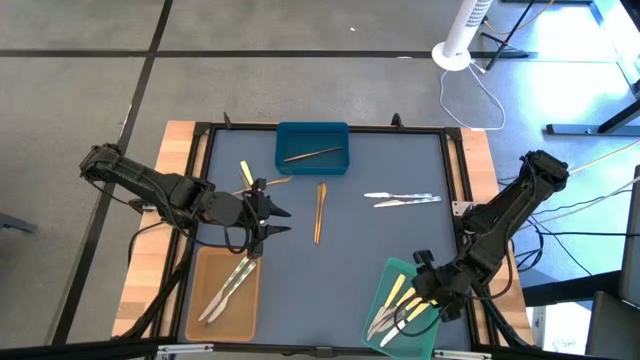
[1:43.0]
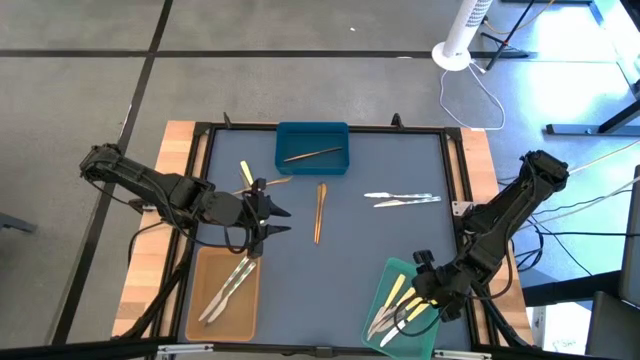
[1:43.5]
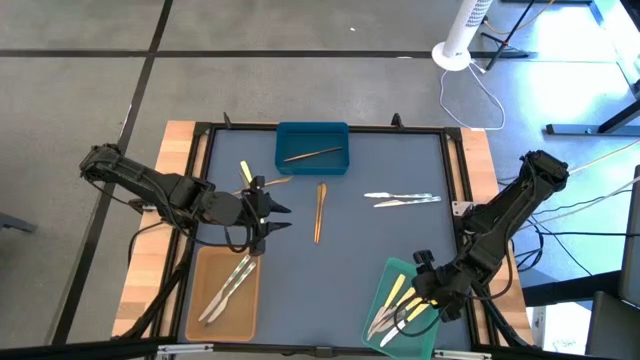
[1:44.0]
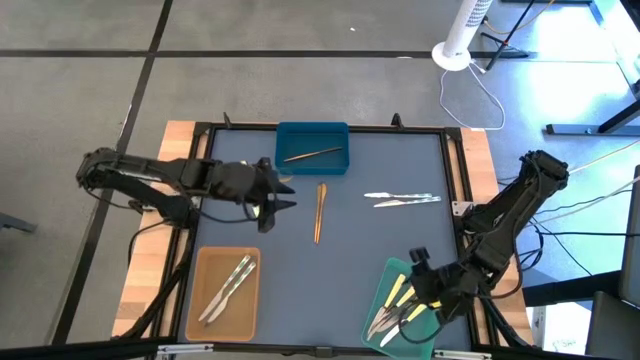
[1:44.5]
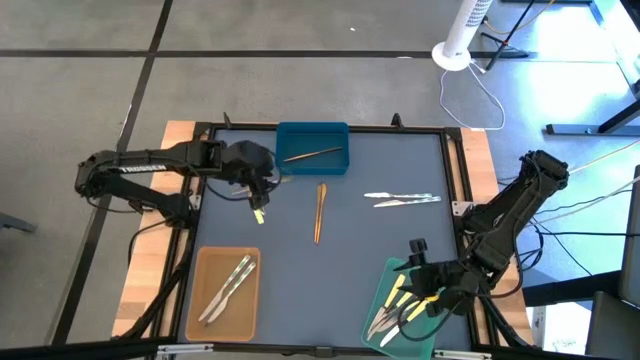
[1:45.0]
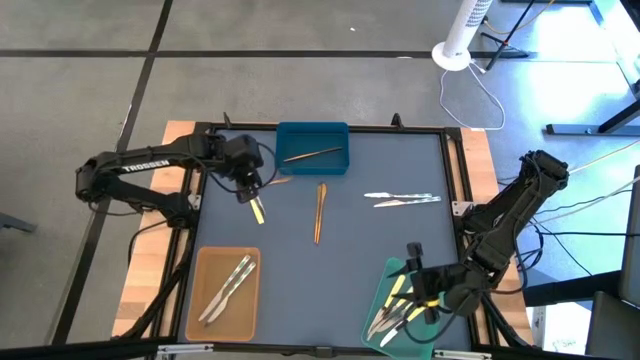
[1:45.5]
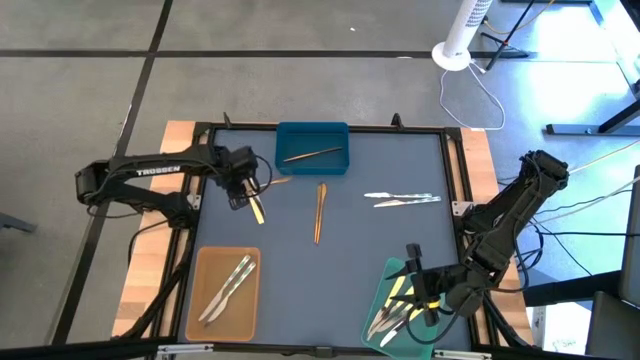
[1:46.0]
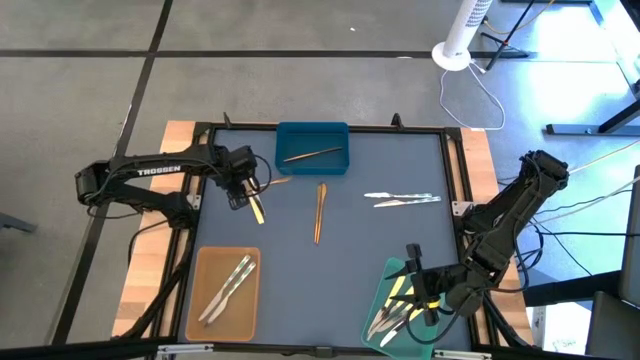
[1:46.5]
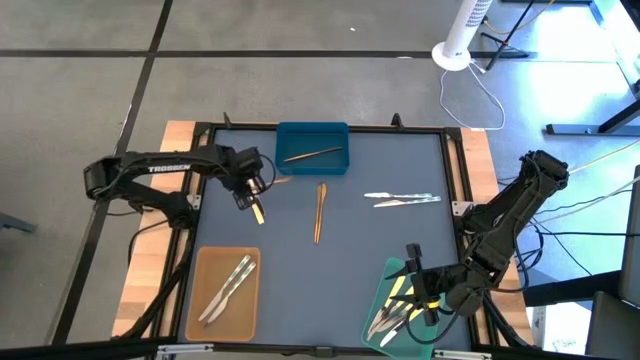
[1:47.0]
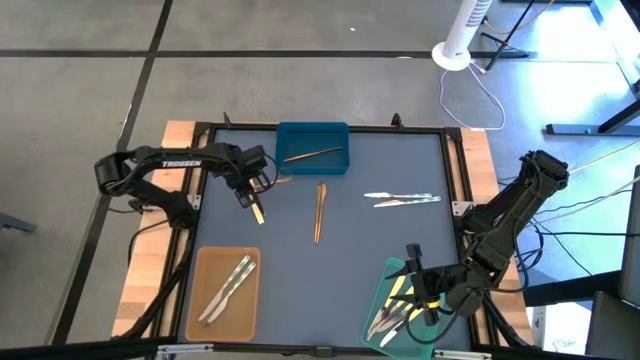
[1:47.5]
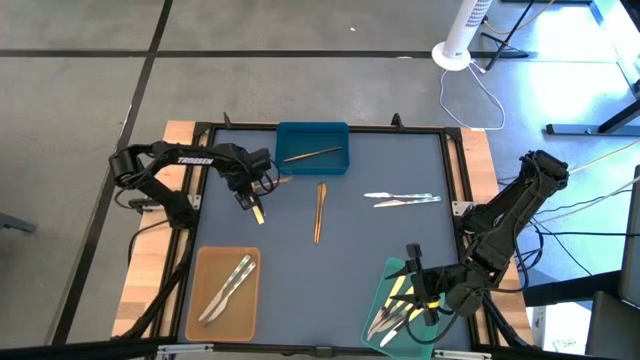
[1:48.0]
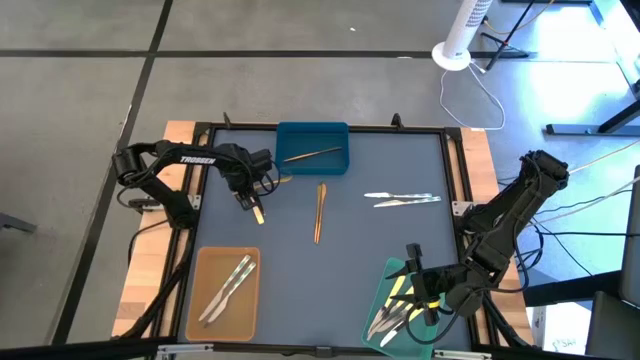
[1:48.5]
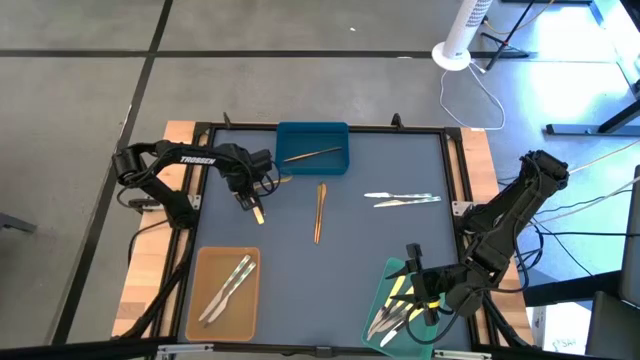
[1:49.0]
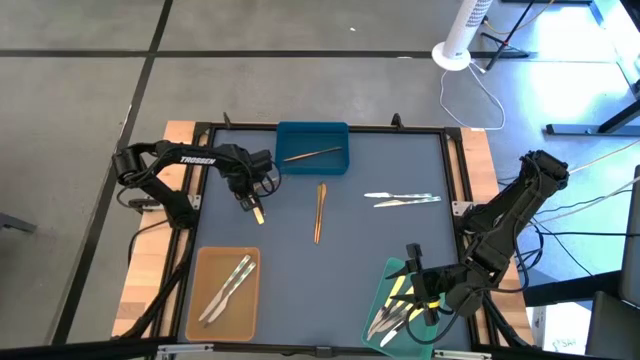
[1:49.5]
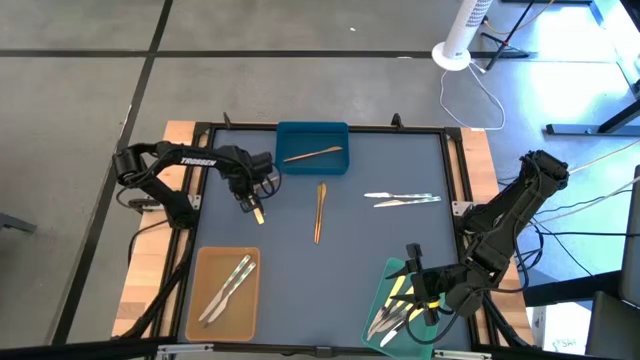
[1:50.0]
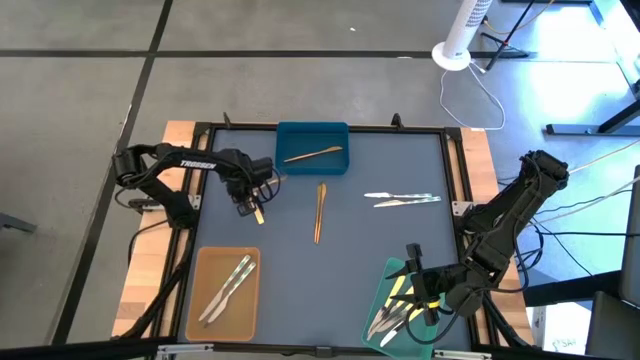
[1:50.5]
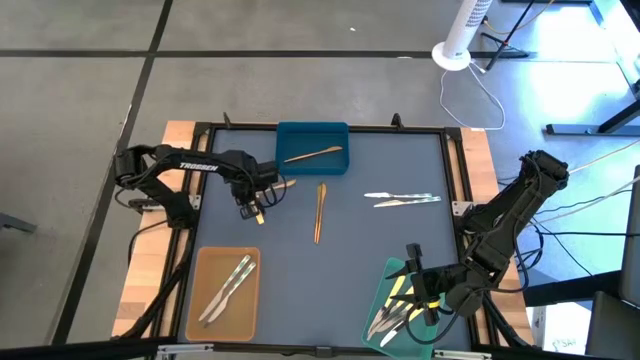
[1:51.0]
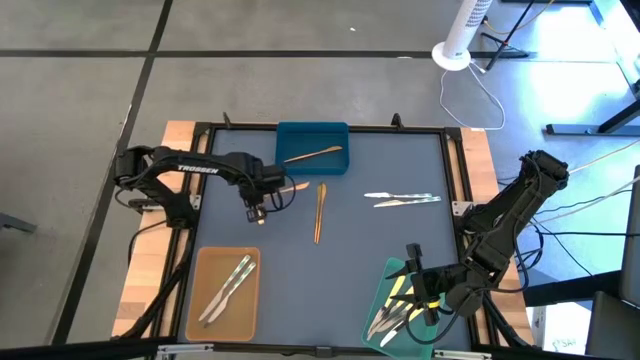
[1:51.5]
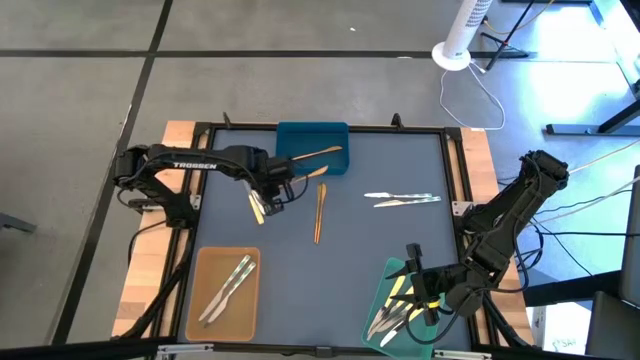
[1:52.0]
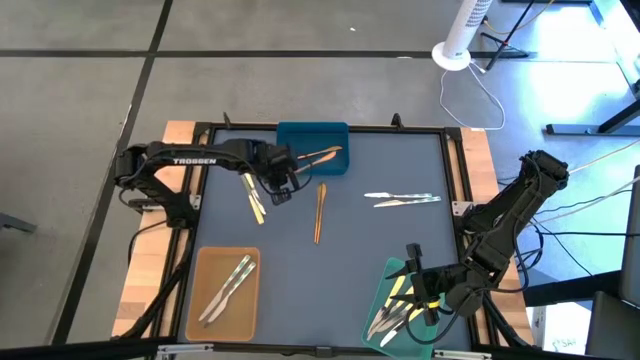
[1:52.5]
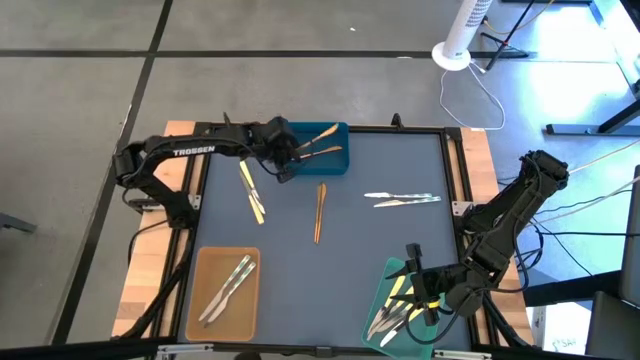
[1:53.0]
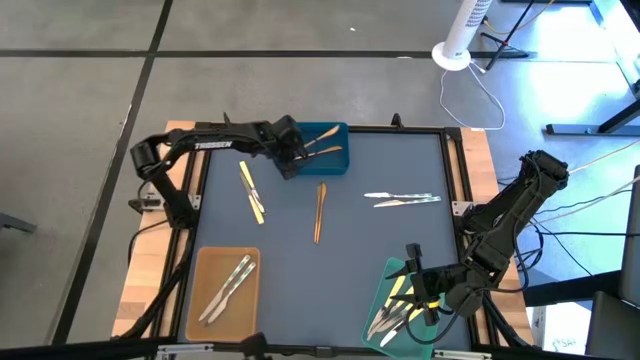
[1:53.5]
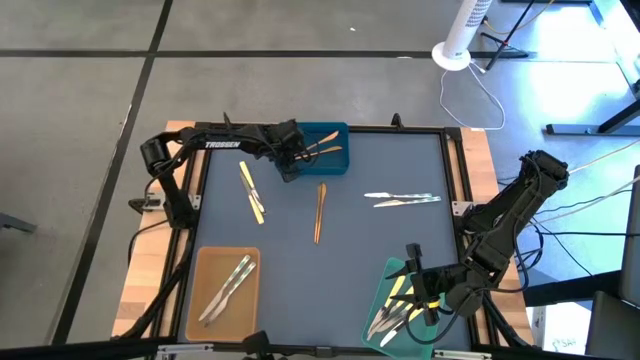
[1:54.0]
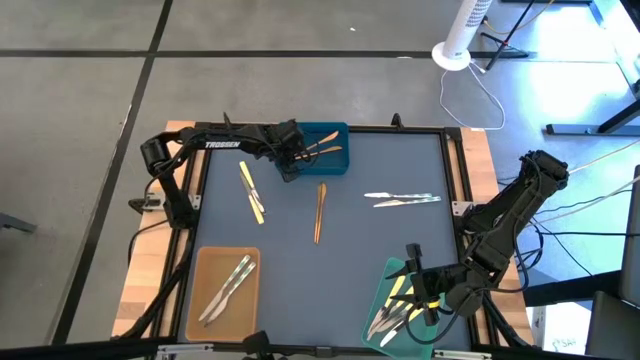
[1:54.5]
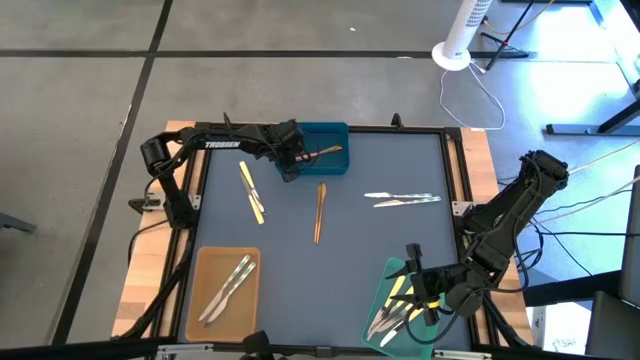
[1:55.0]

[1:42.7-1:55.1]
Task: Sort silverware by color (type)
Put the gold knife into the blue bin

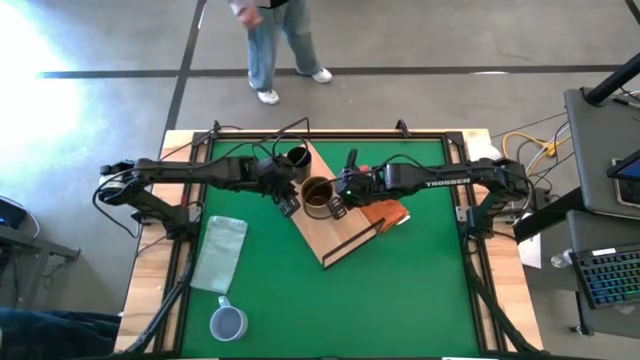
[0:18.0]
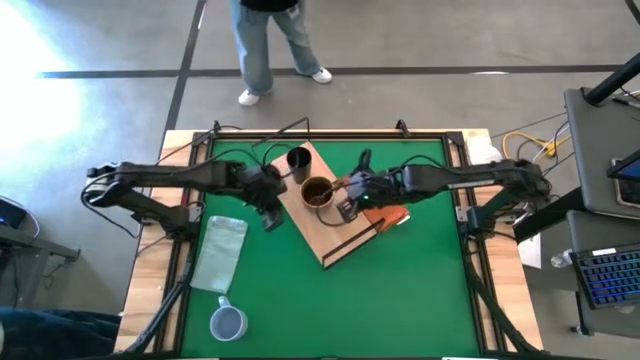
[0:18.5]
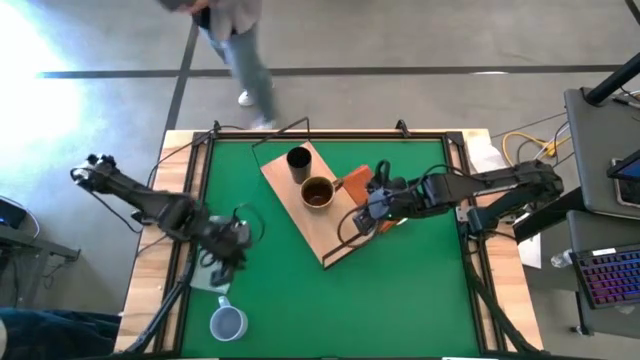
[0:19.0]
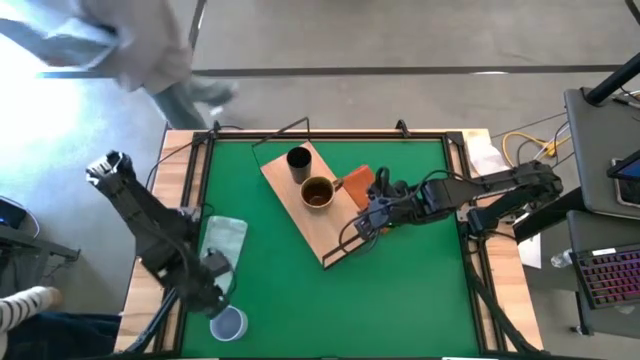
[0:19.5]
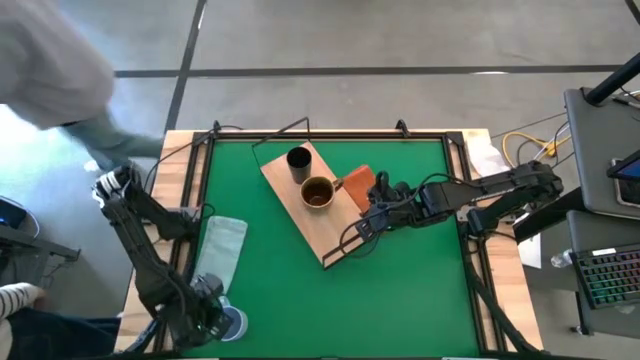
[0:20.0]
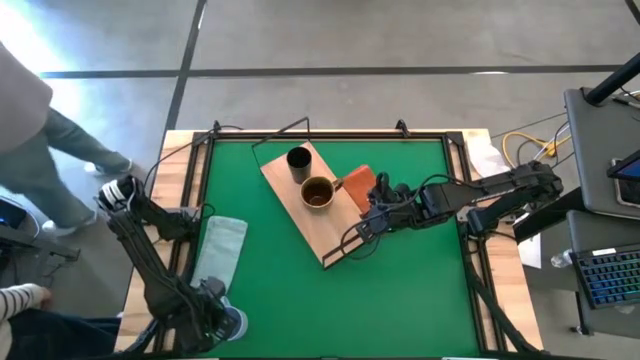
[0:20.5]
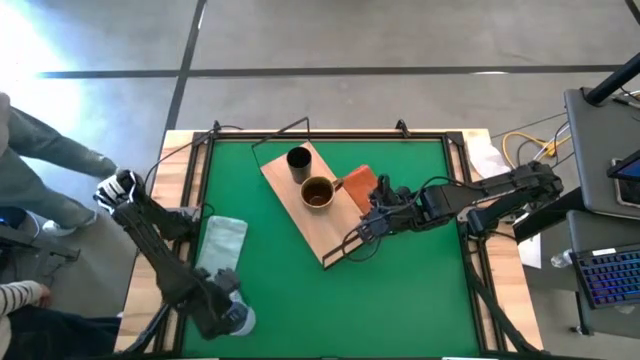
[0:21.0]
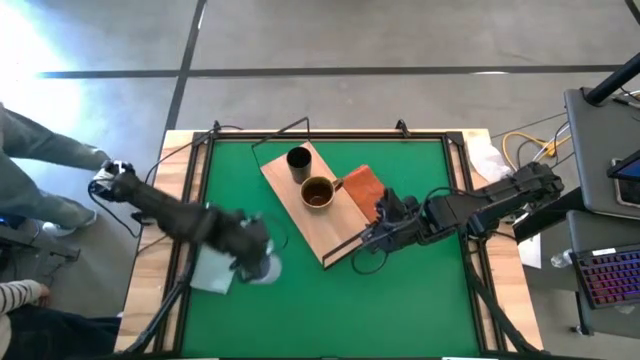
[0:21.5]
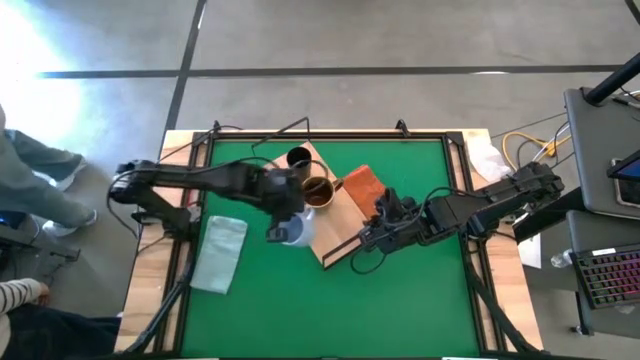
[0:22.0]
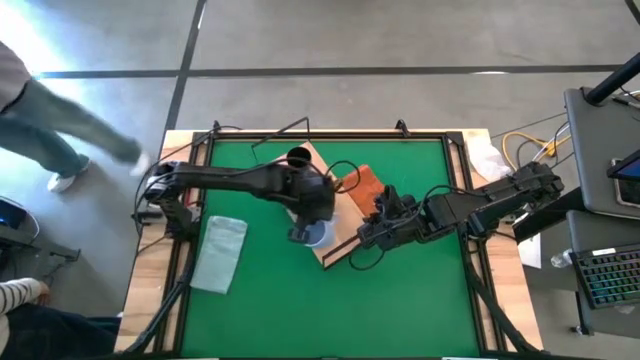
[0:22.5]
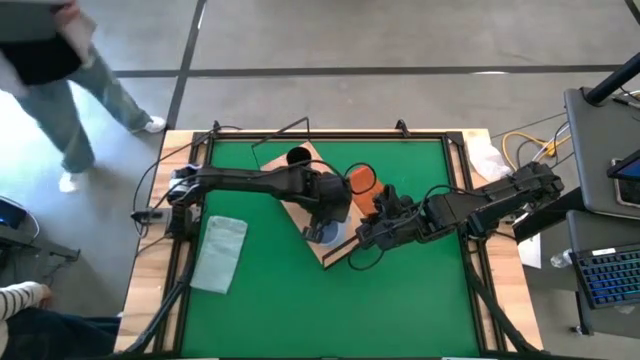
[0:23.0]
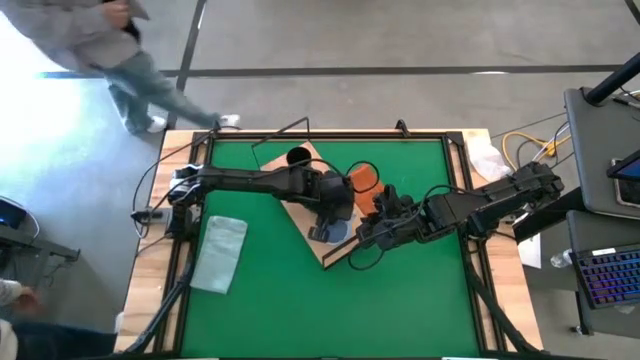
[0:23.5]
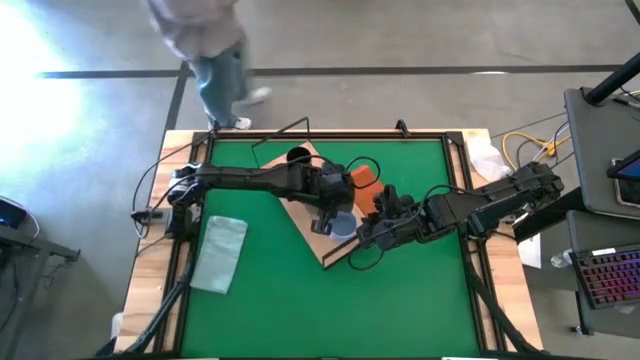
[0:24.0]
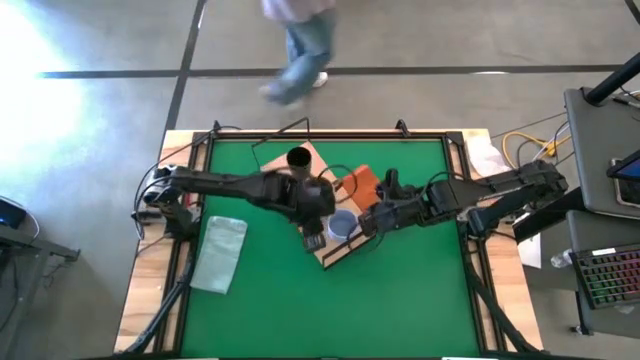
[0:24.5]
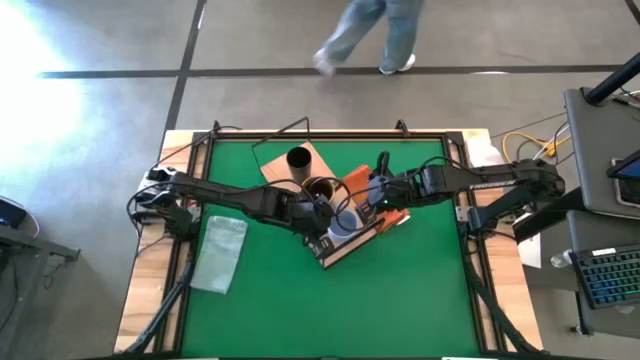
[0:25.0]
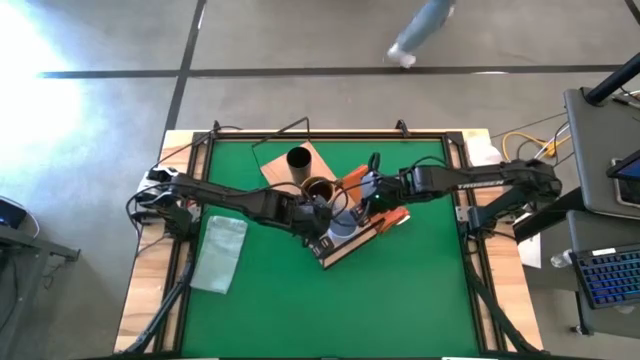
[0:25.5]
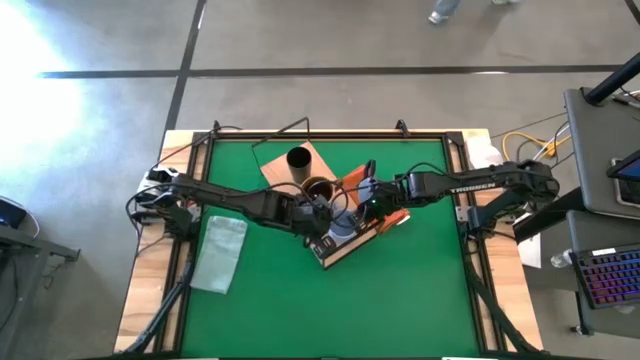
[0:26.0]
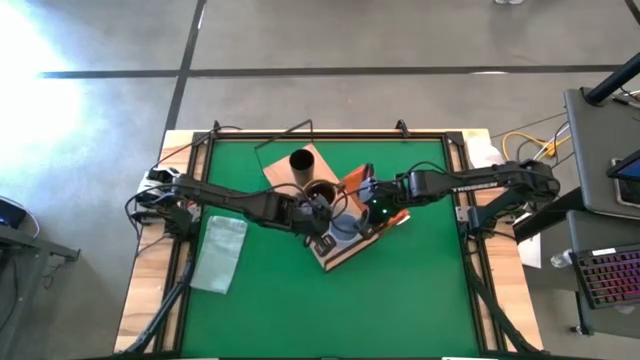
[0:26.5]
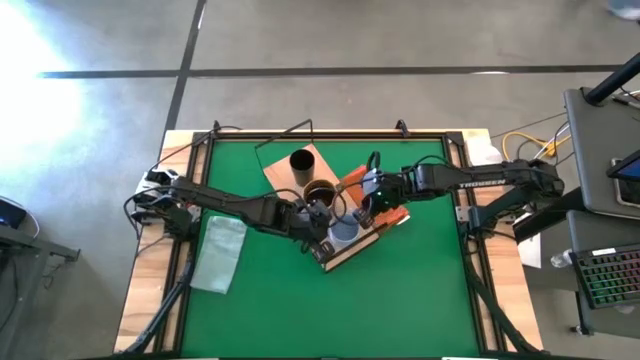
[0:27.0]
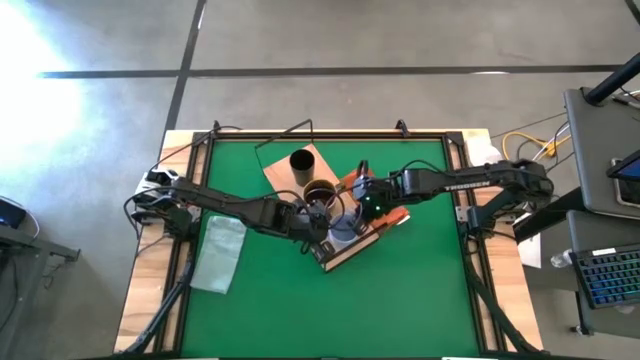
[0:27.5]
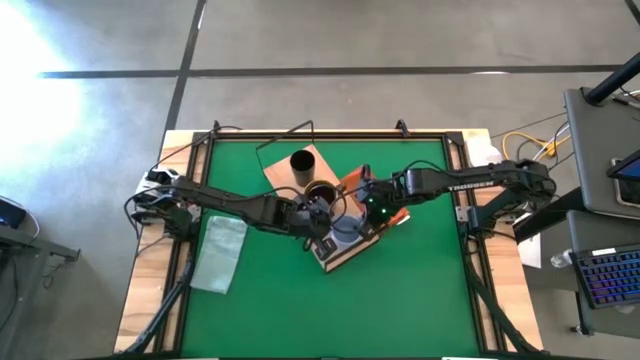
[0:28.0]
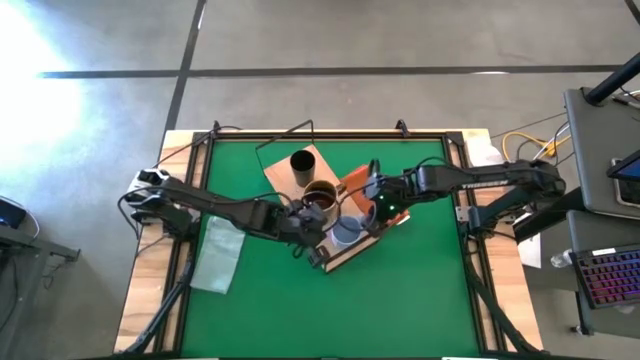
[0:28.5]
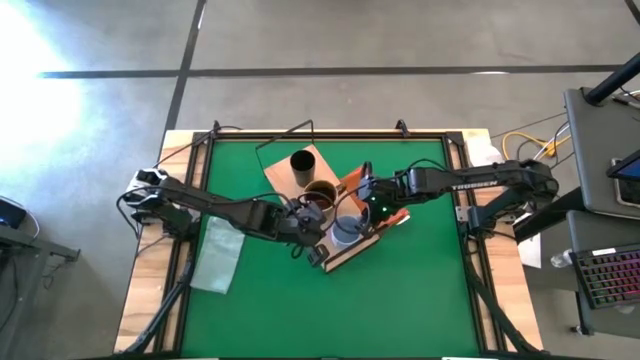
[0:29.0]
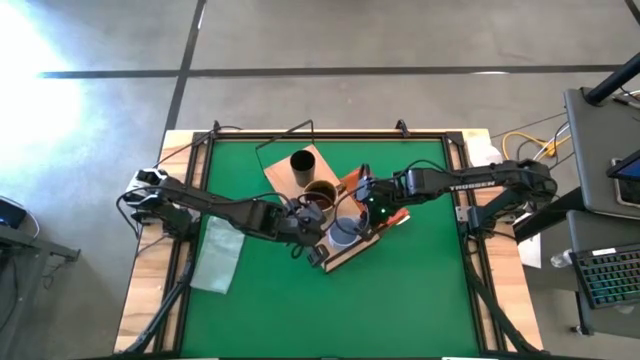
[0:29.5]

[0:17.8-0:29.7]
Task: Stack small to large cups/mugs on shelf
Put the blue mug on the shelf
